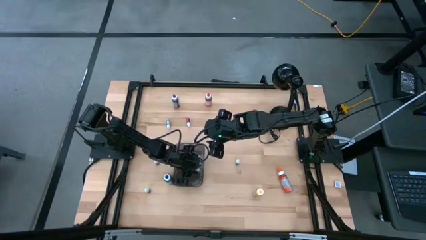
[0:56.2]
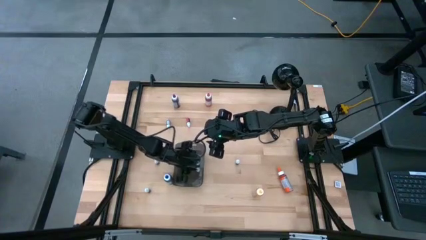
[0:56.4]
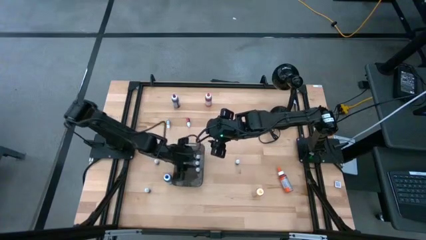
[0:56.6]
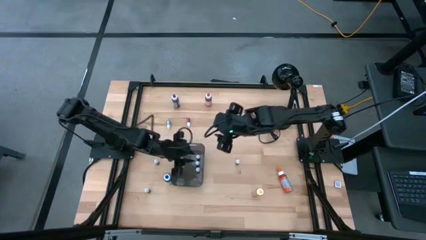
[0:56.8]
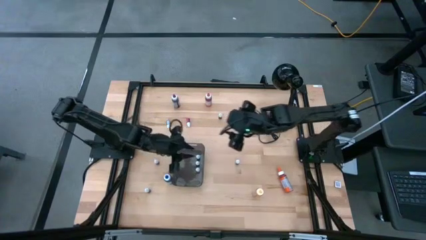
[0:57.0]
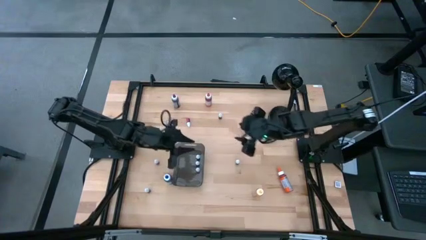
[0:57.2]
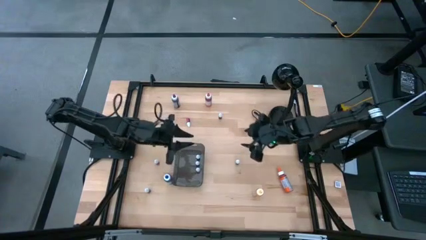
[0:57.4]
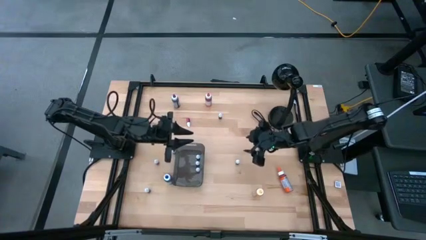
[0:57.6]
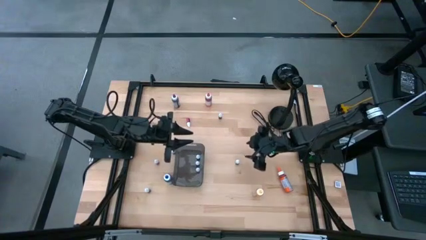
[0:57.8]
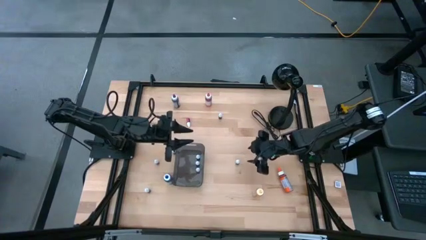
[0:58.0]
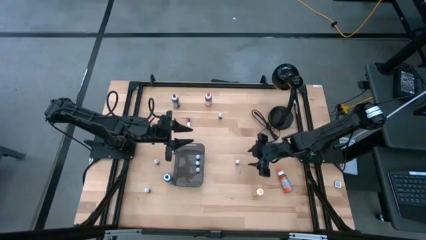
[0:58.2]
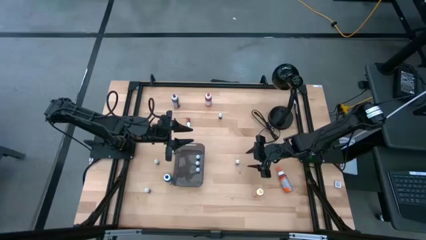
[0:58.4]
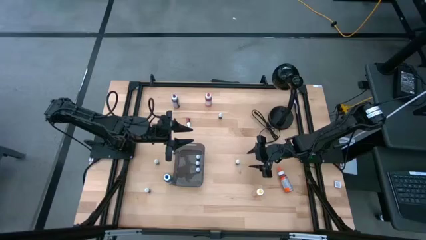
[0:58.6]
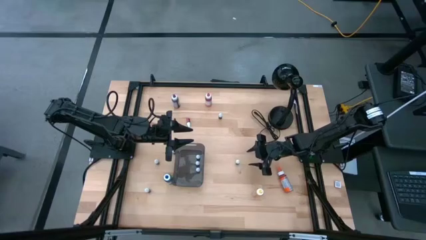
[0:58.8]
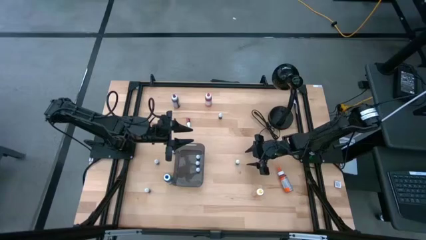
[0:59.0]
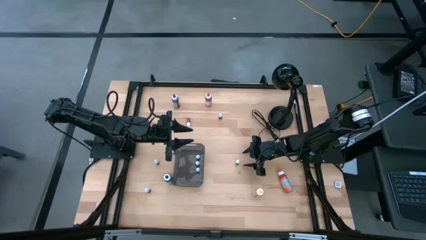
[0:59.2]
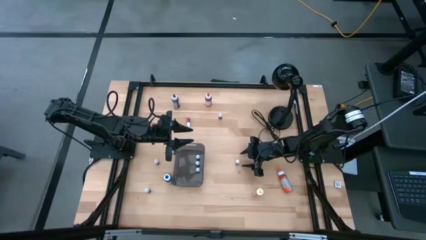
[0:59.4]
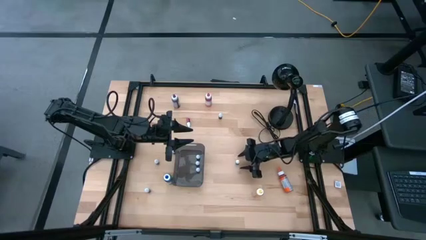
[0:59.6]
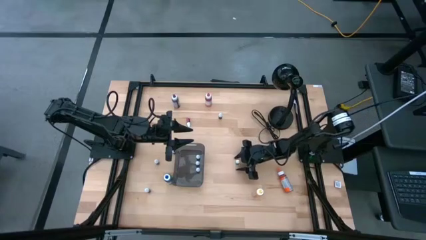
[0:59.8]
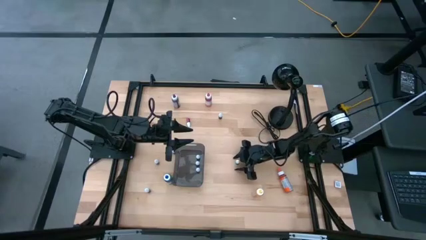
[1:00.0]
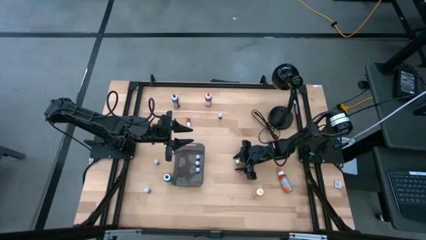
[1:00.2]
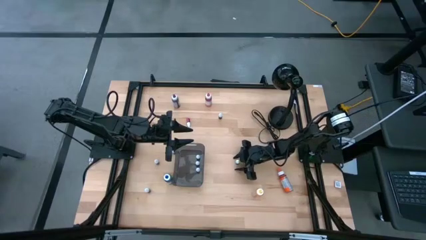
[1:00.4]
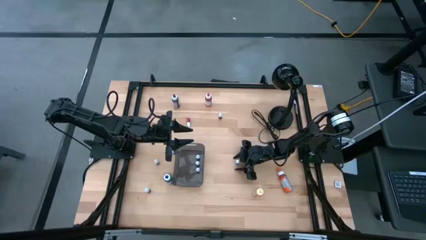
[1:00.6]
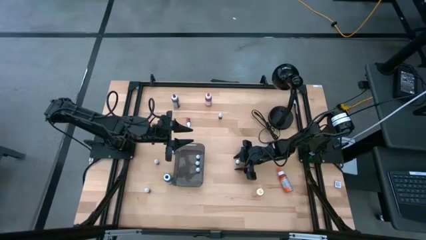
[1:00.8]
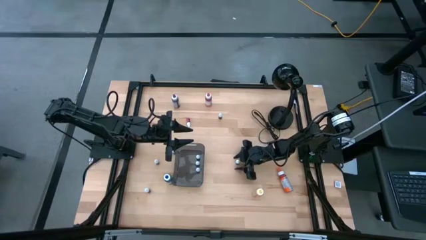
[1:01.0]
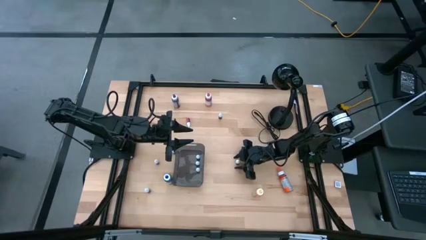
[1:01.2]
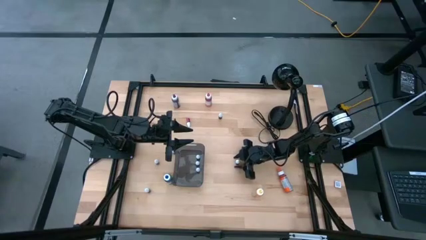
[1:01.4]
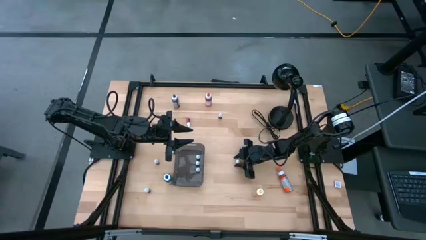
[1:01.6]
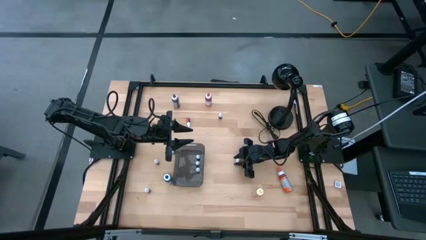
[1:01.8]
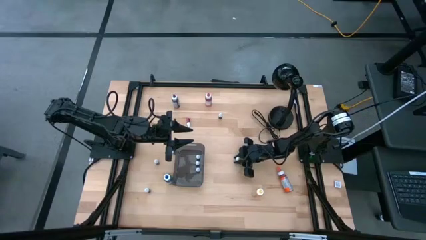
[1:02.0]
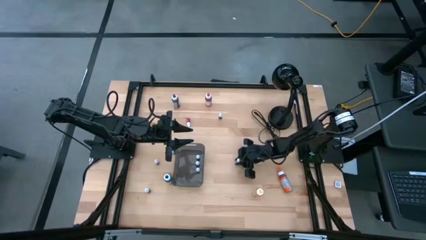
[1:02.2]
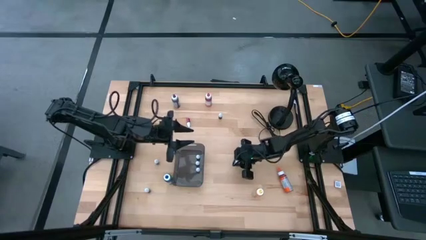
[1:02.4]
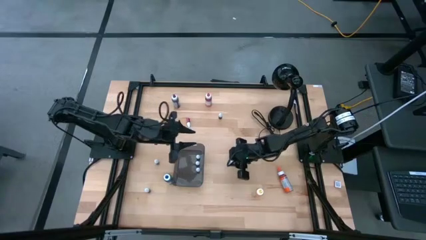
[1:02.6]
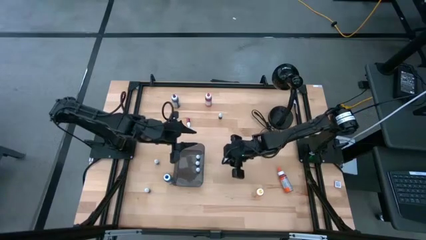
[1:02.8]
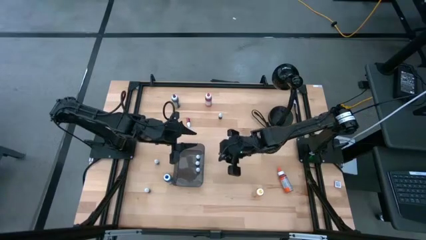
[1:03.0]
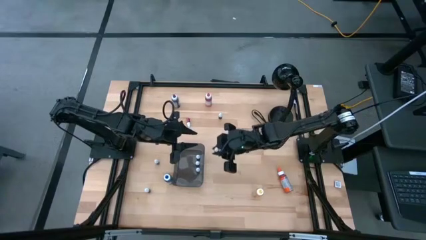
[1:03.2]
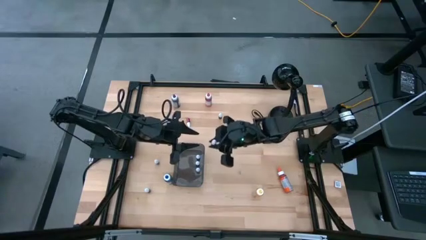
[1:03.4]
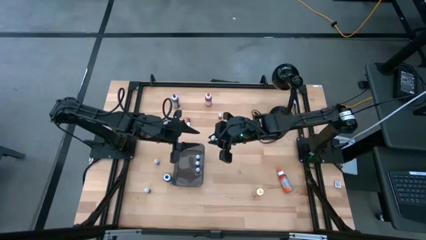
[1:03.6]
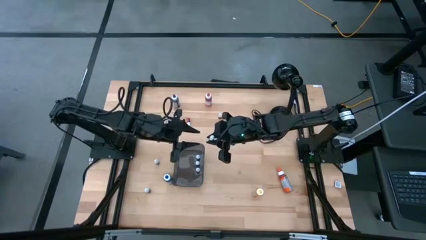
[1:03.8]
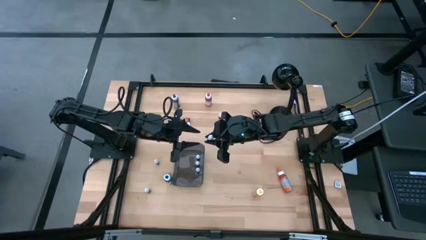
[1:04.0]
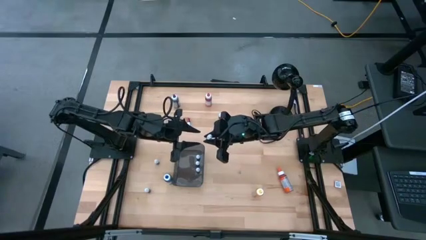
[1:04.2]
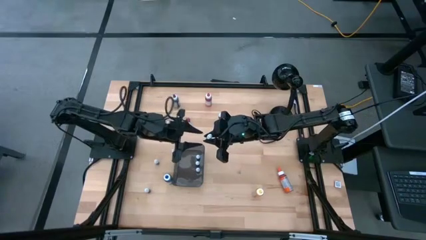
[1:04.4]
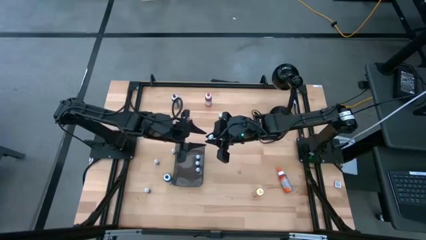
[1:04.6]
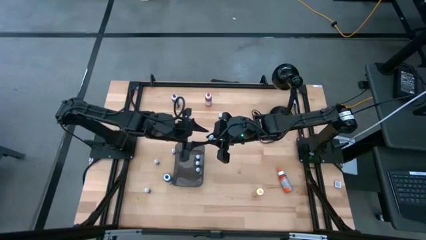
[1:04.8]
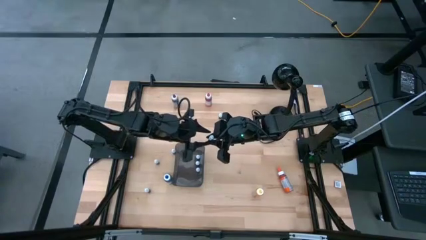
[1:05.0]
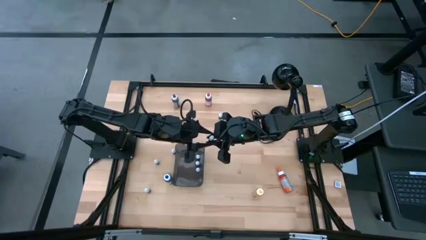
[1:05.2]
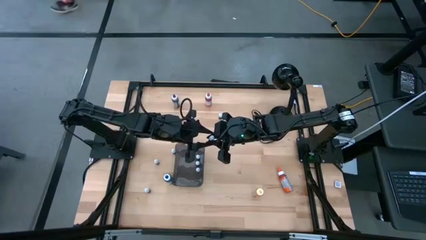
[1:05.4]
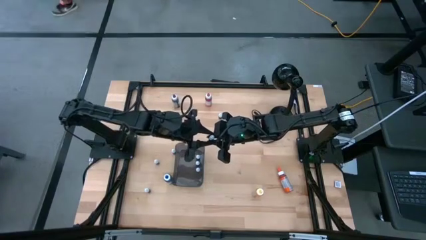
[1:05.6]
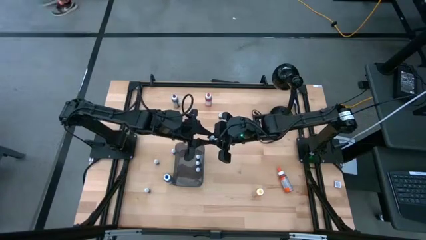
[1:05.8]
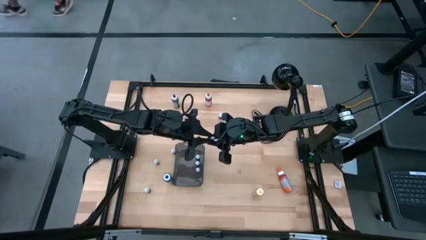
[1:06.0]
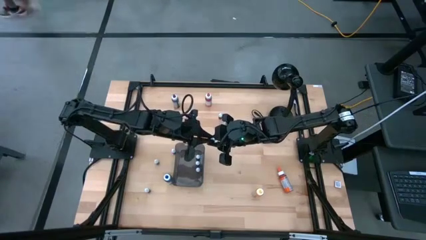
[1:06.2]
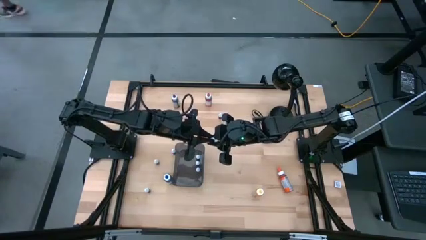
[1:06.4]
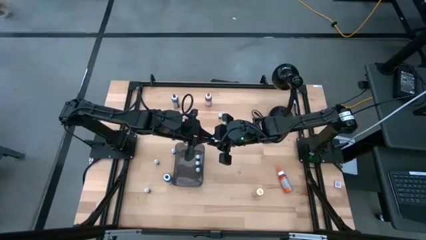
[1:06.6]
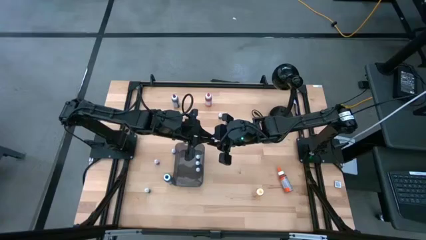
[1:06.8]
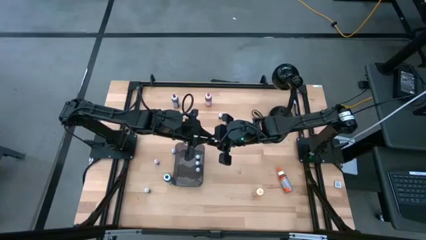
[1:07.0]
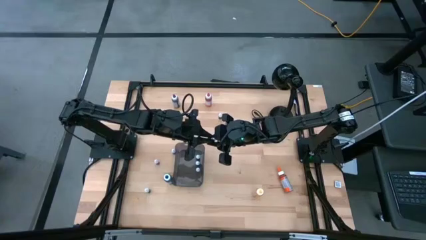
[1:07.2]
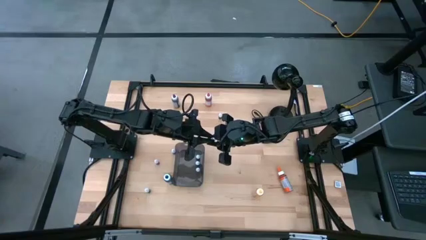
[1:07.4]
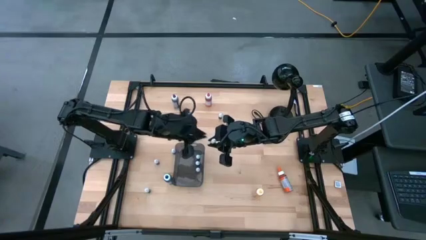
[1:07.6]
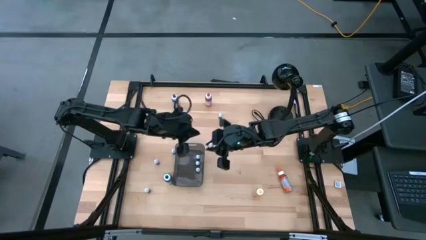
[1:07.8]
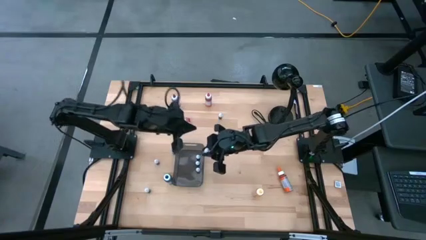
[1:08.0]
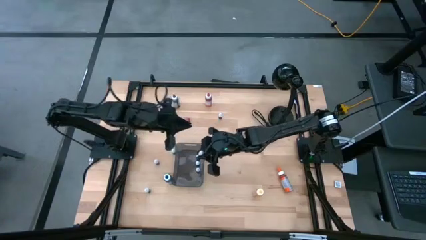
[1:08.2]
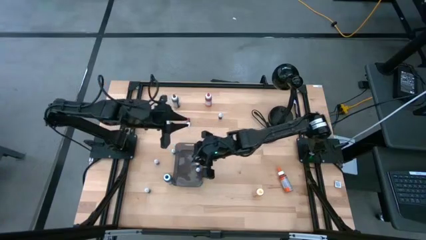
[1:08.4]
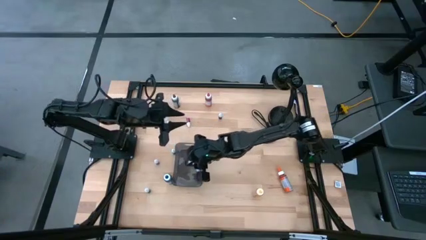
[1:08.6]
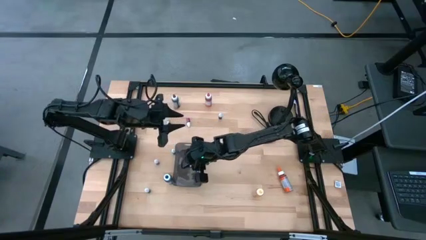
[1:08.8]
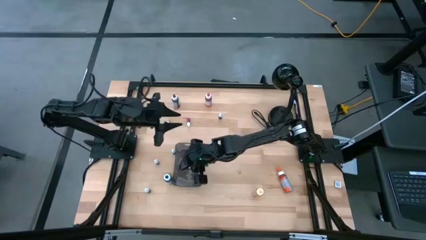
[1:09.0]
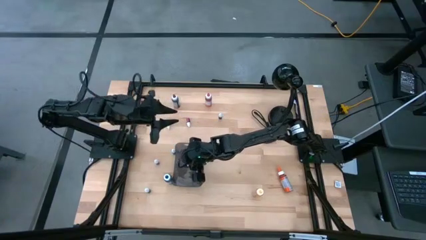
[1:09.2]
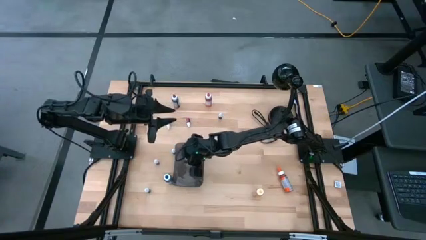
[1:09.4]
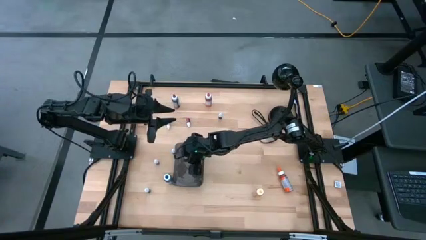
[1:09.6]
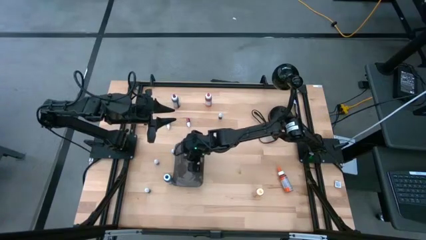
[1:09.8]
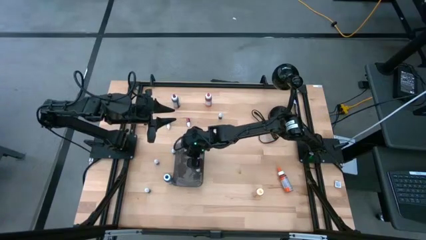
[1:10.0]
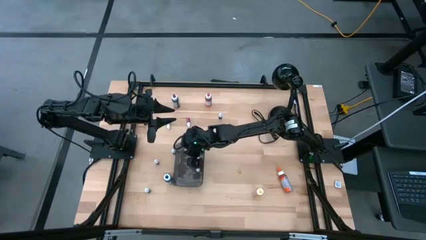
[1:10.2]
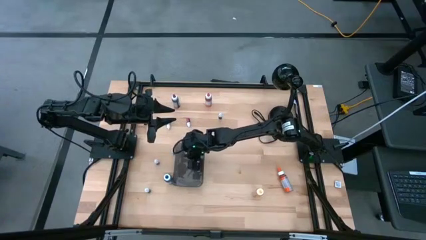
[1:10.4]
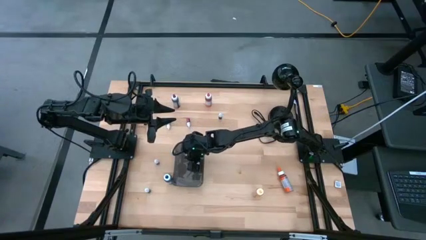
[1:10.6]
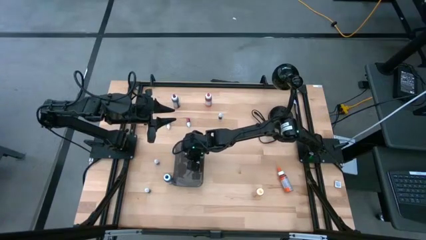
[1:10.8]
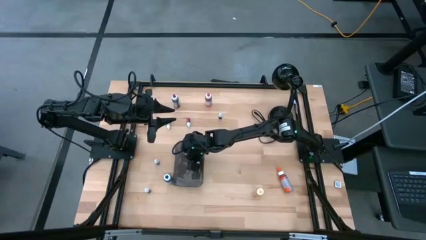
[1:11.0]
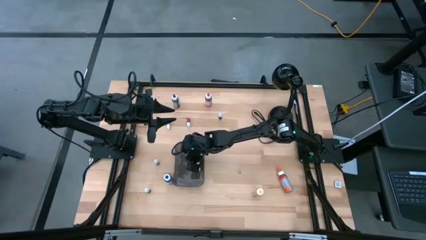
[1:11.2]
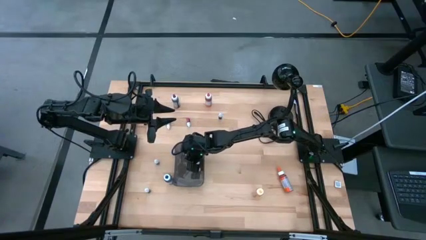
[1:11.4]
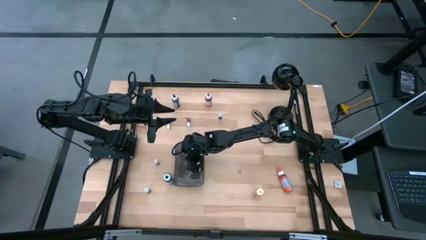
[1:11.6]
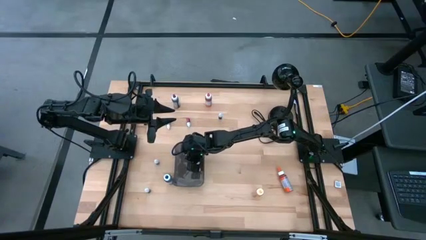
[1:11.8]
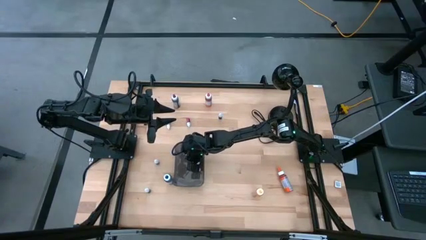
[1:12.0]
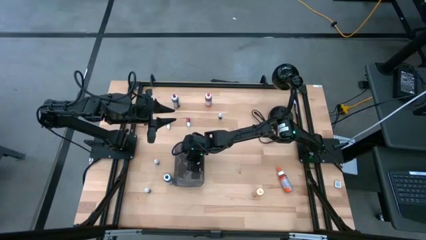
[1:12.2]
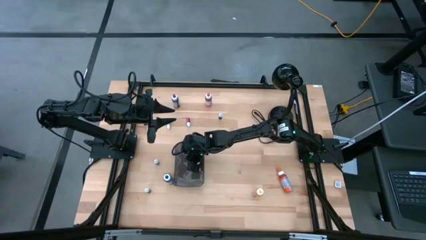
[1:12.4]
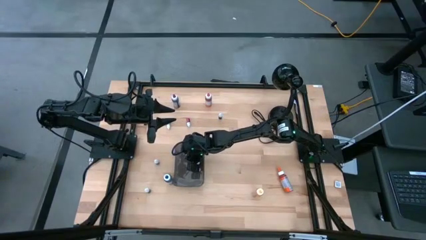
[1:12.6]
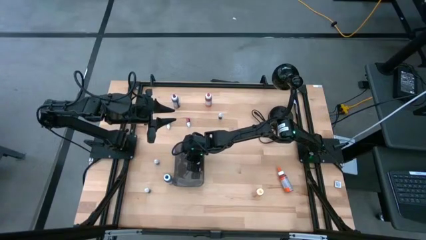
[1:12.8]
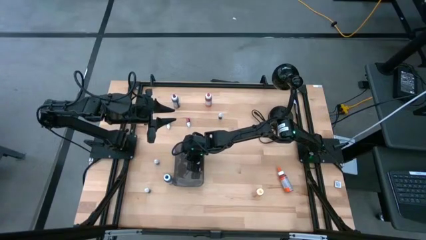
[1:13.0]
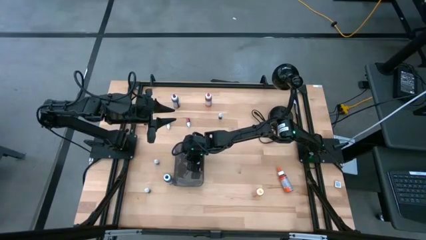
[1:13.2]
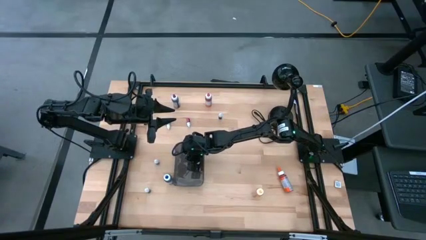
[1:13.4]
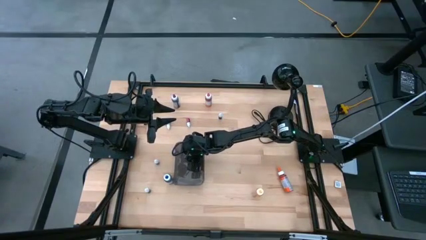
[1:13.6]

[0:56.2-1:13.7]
Task: Pick & Place food coloring
Put the bottom red food coloring bottle into the bin
